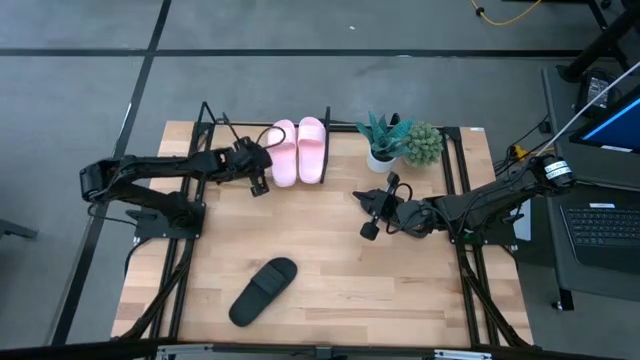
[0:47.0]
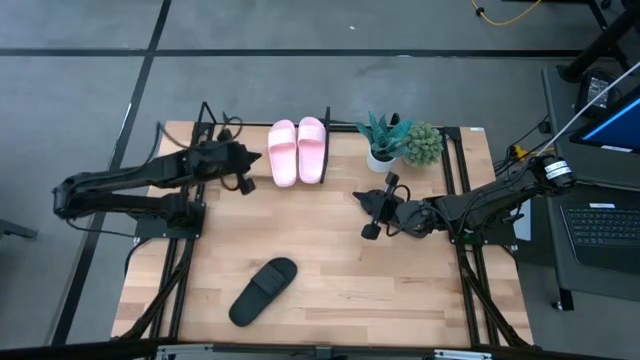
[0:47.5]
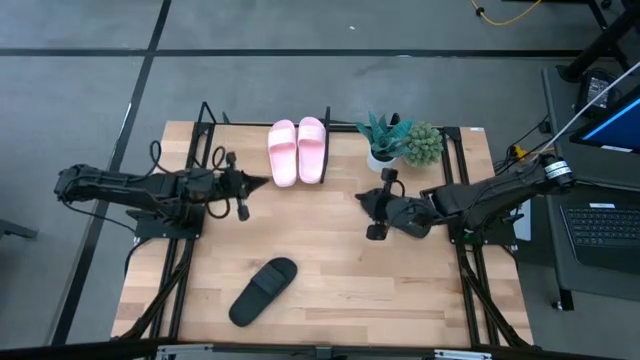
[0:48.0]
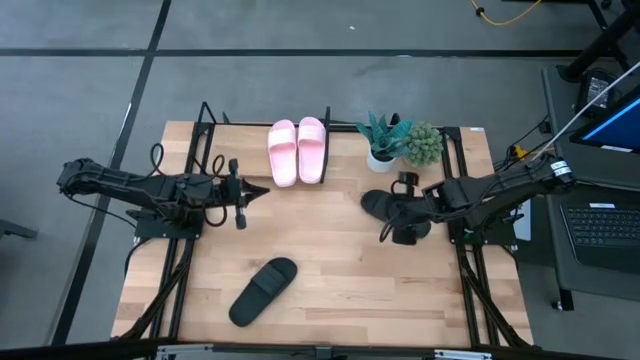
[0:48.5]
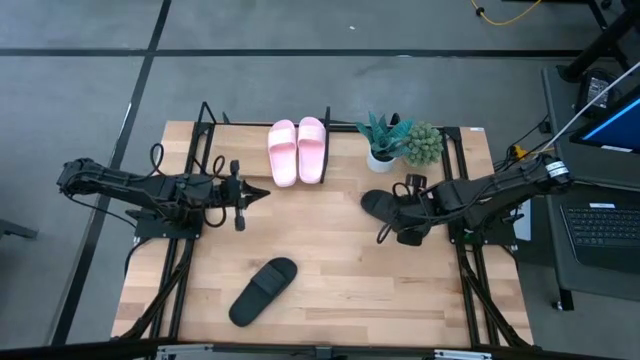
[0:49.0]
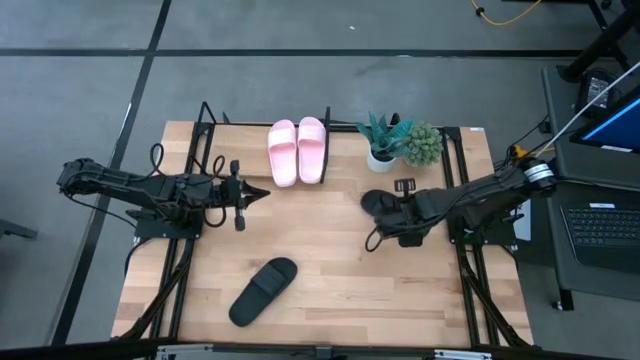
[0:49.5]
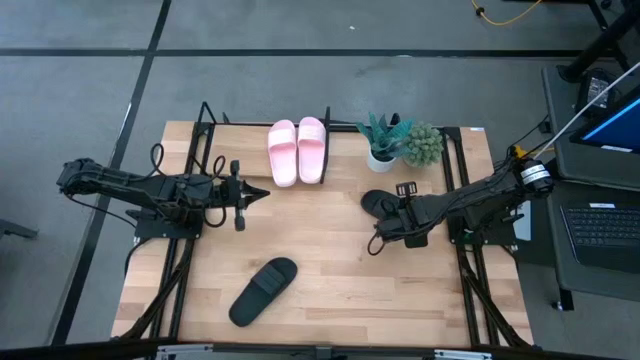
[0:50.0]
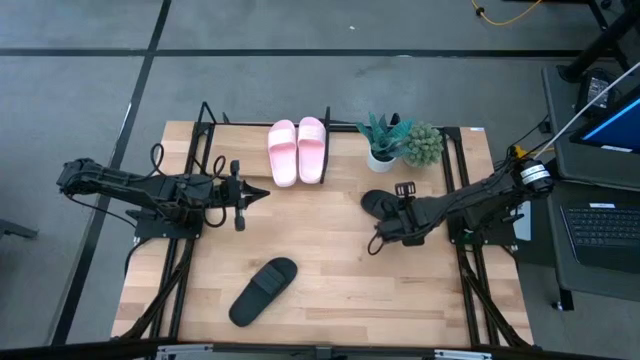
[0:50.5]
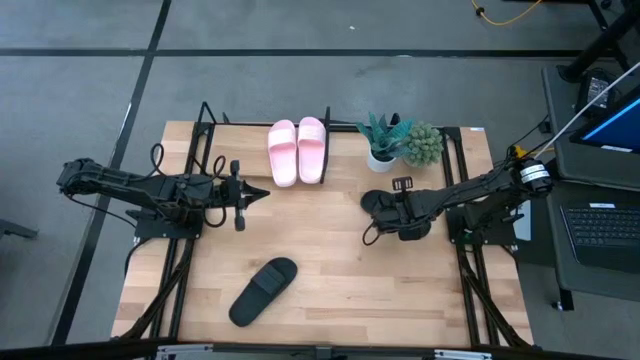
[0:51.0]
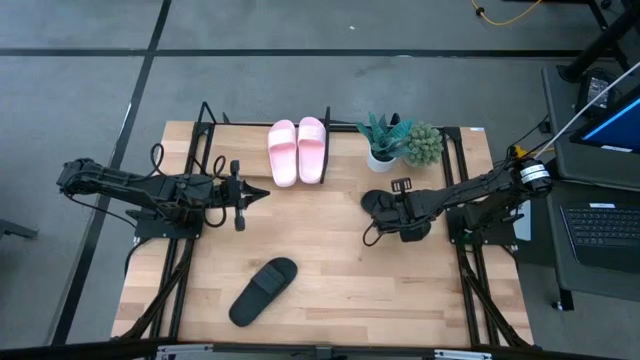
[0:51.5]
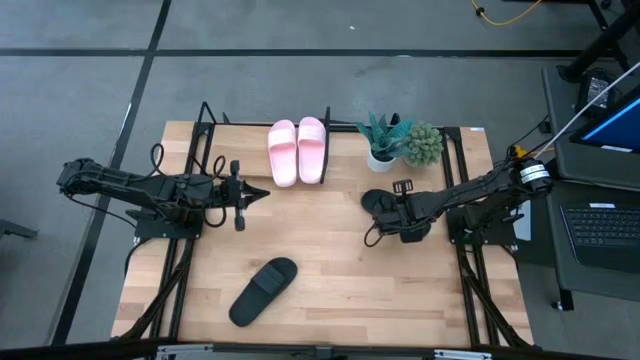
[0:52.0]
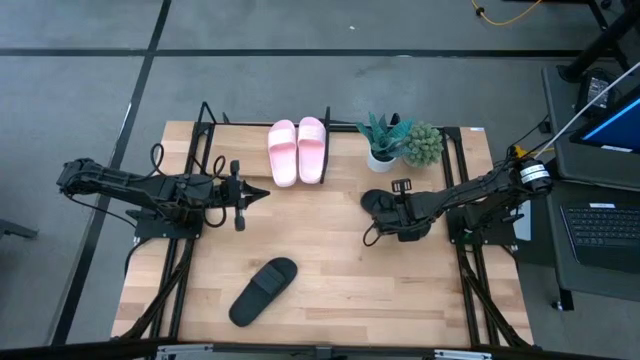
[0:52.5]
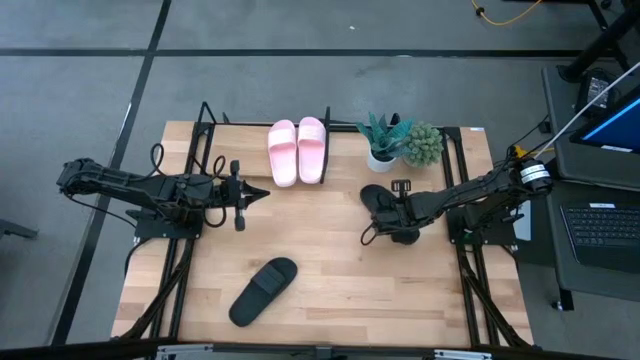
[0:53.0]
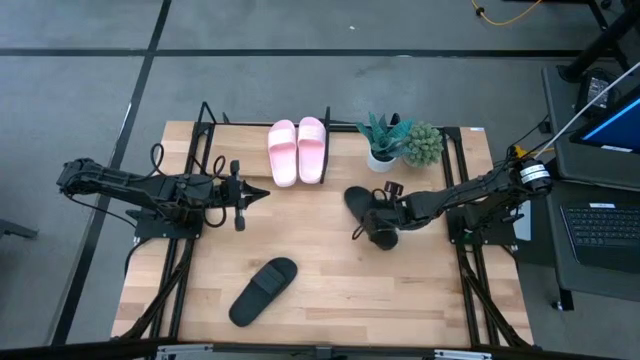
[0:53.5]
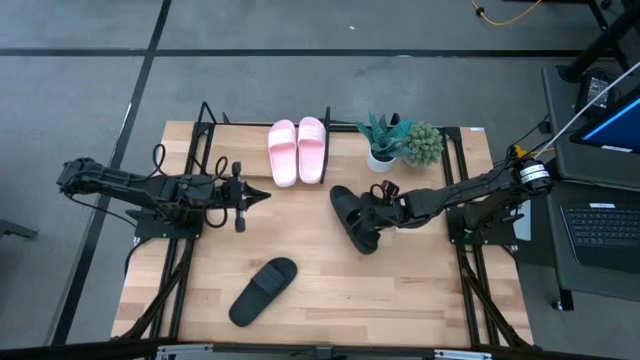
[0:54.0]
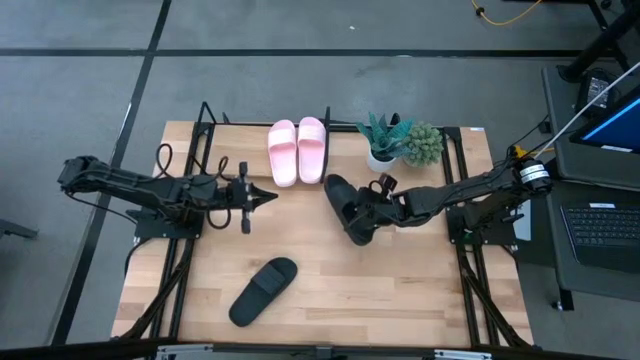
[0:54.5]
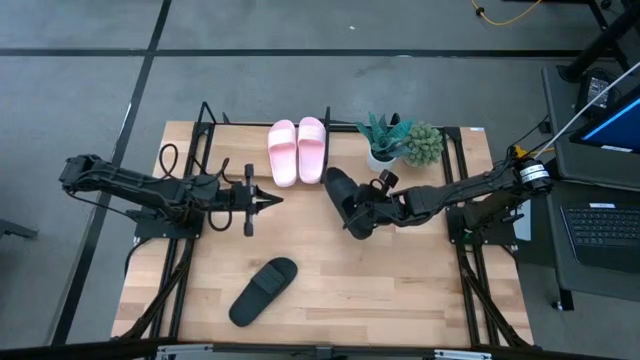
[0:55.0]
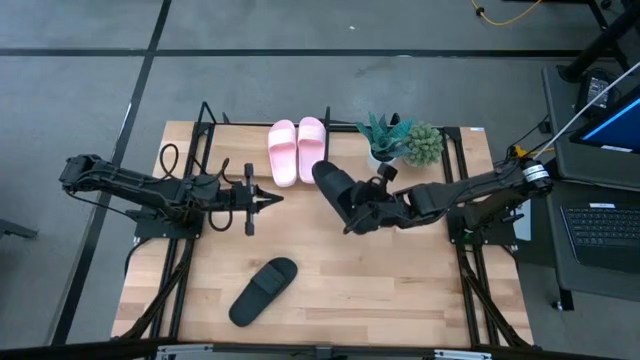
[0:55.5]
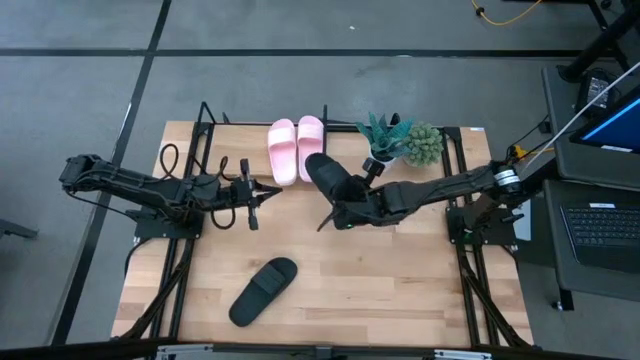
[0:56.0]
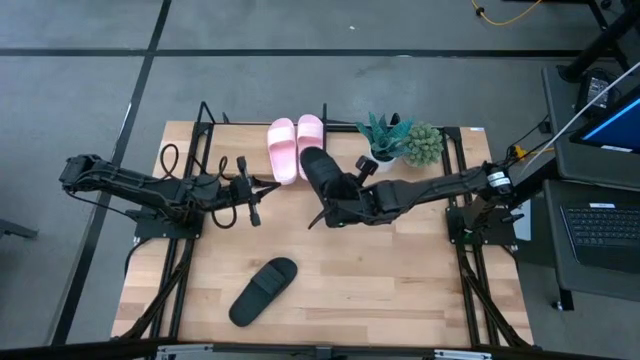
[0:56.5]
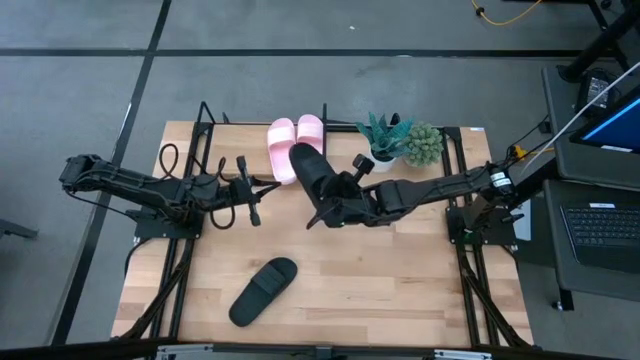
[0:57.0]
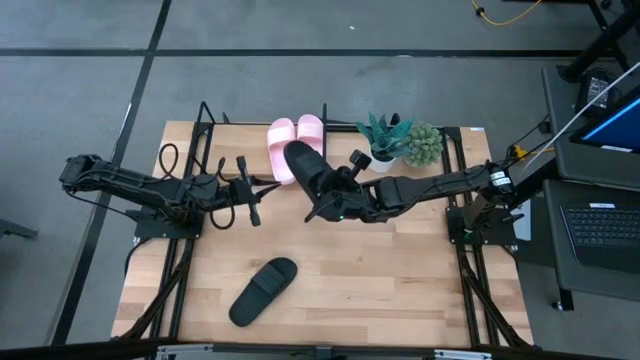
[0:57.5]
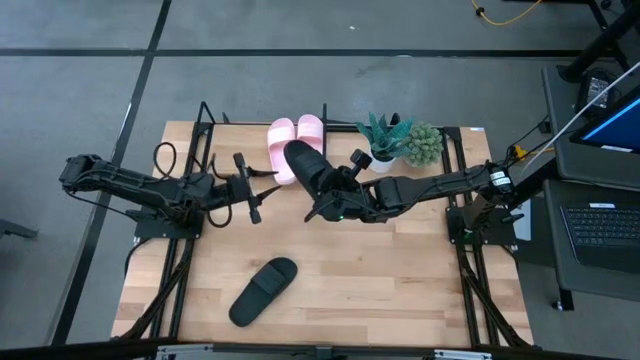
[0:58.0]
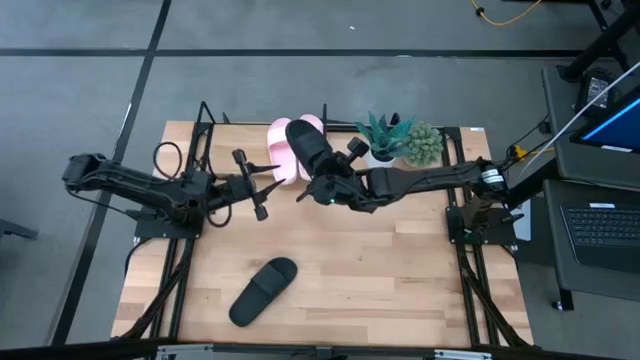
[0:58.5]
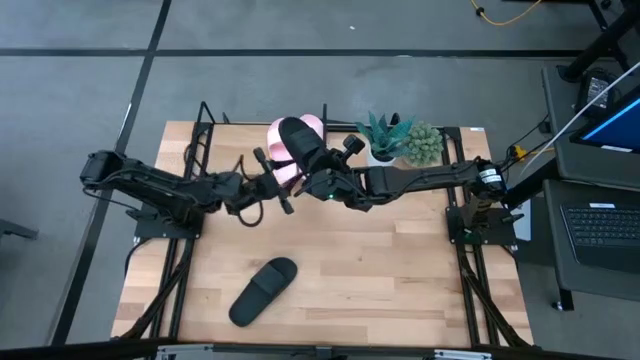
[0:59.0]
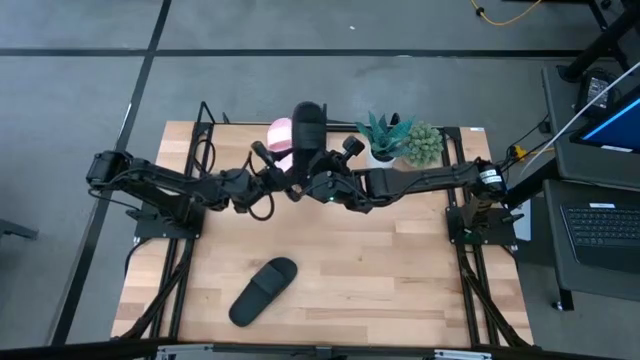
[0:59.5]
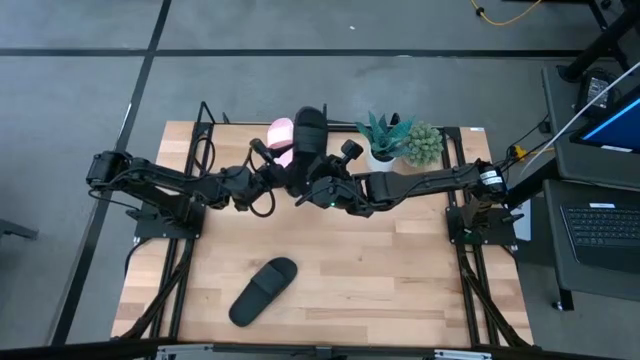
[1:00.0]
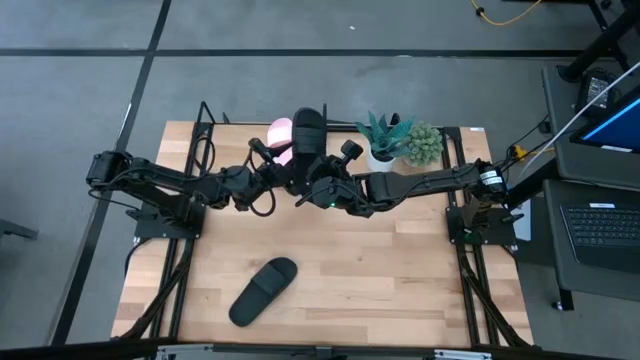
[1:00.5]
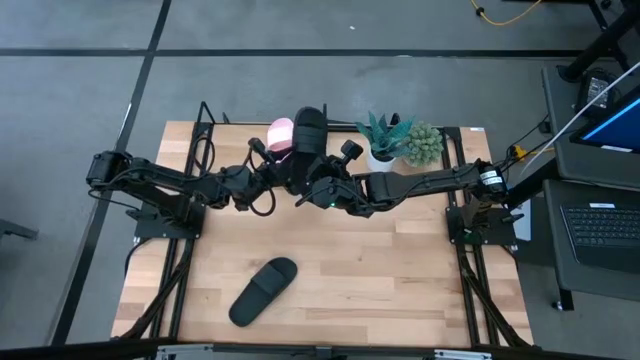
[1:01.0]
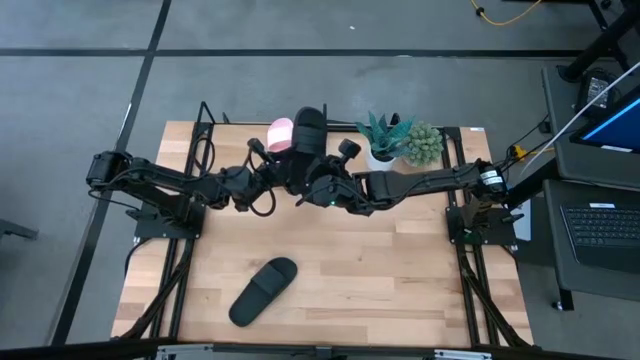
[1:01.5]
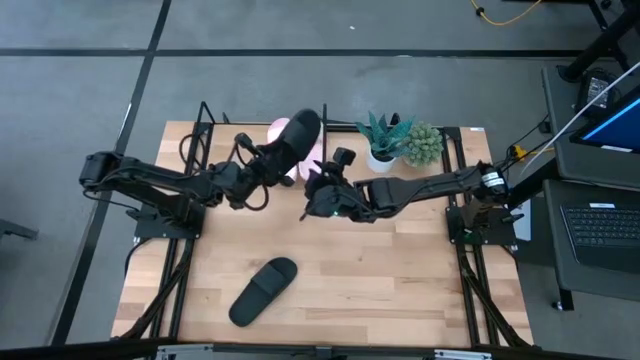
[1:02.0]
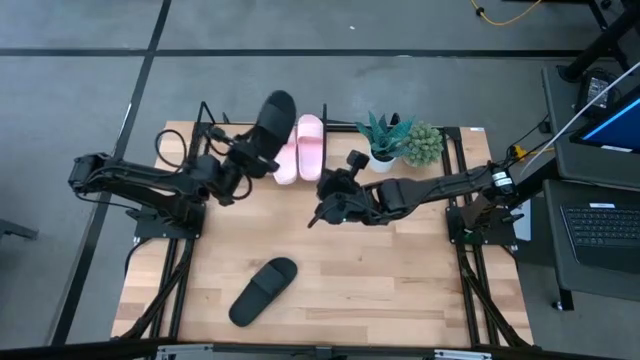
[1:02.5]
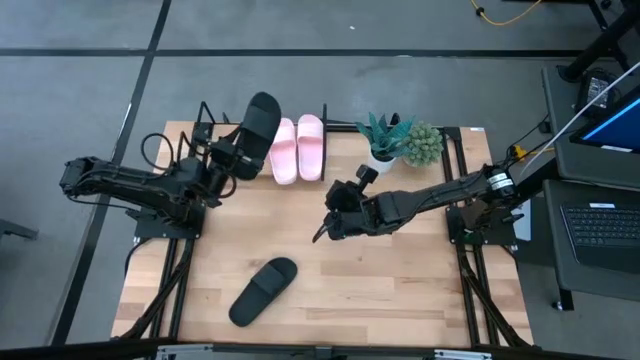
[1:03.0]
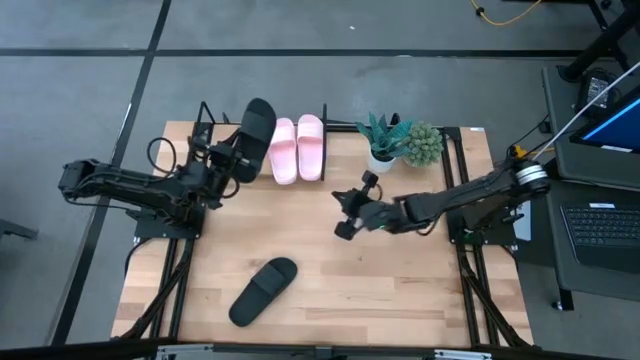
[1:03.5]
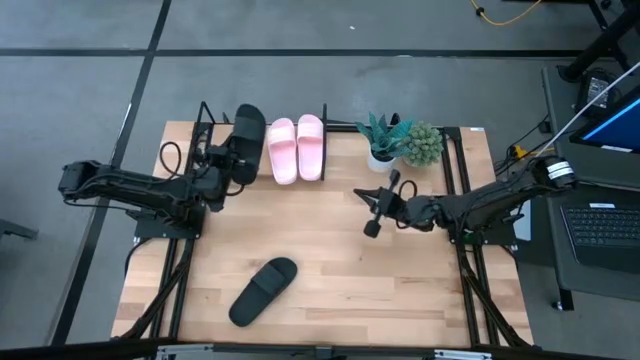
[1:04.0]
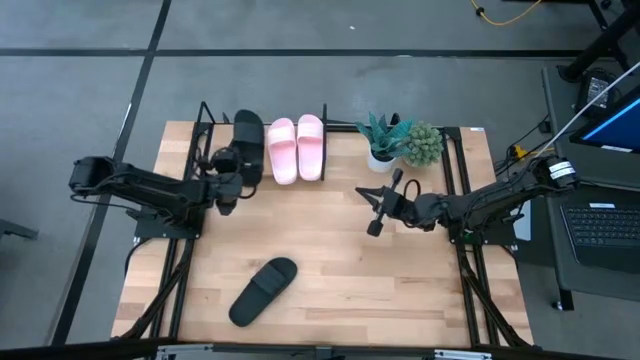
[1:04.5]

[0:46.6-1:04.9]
Task: Pick and place slides into the shelf
Put the right black slide on the shelf
